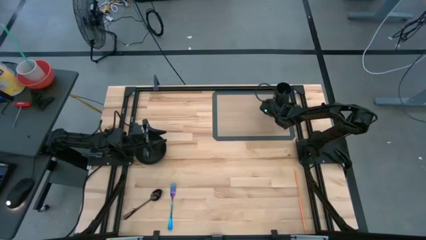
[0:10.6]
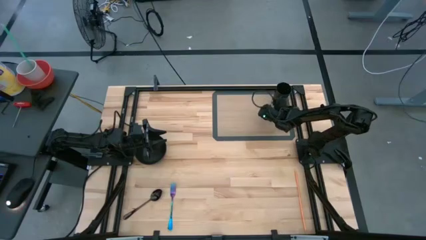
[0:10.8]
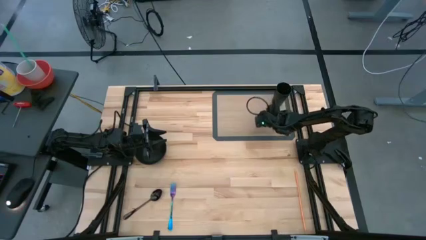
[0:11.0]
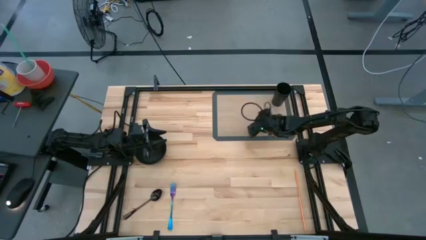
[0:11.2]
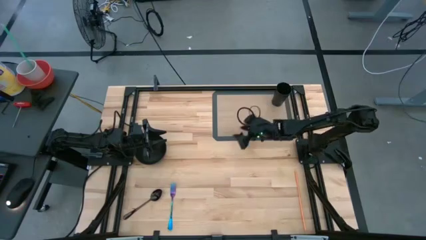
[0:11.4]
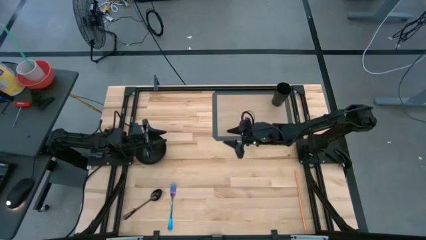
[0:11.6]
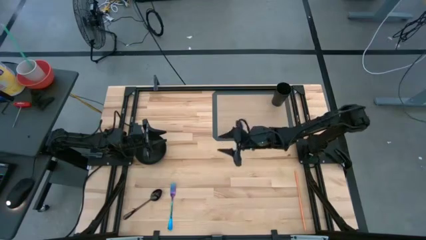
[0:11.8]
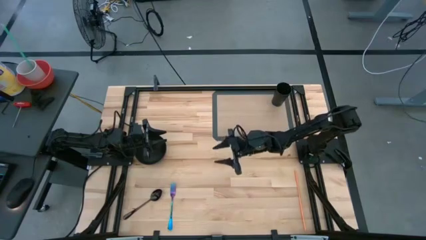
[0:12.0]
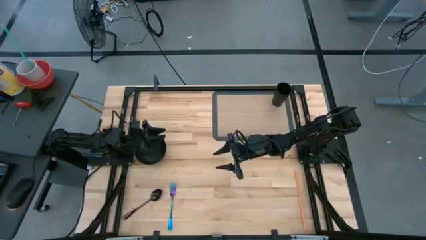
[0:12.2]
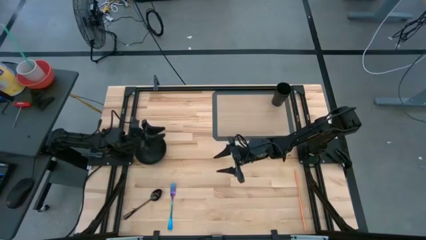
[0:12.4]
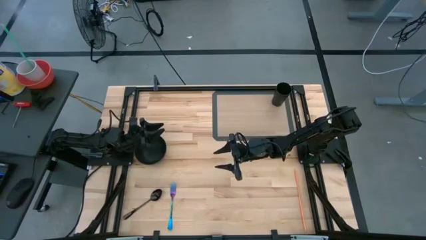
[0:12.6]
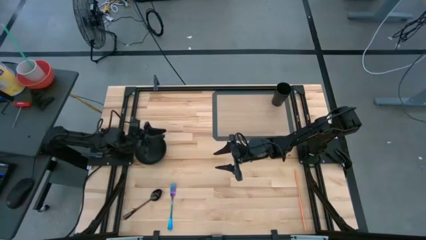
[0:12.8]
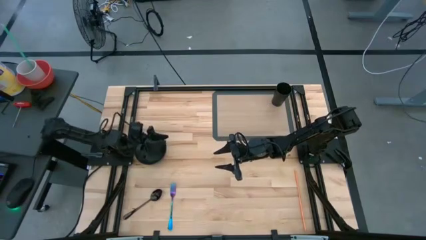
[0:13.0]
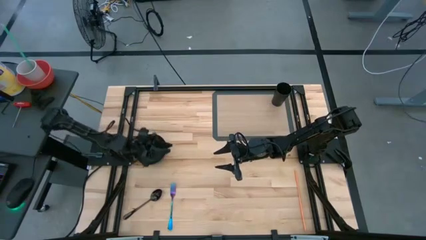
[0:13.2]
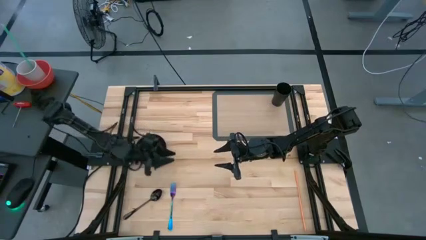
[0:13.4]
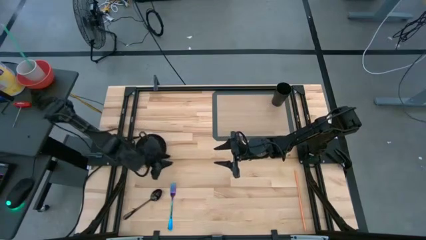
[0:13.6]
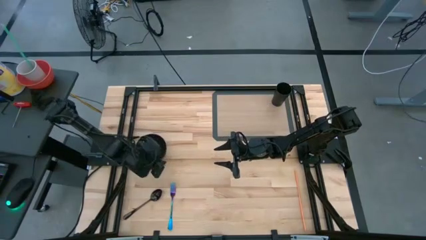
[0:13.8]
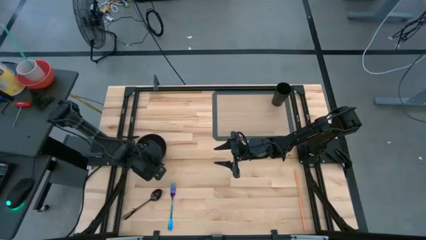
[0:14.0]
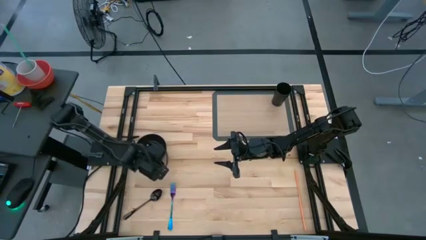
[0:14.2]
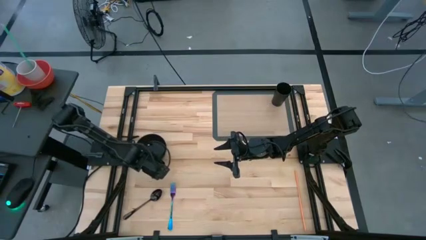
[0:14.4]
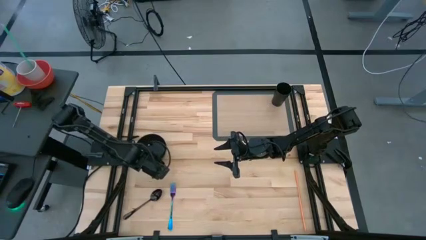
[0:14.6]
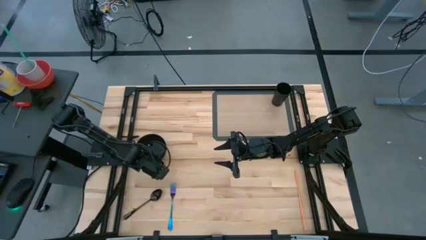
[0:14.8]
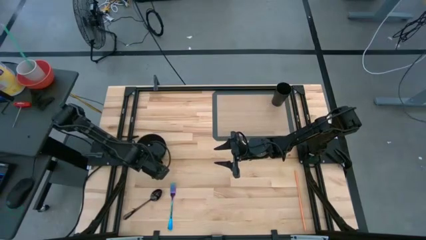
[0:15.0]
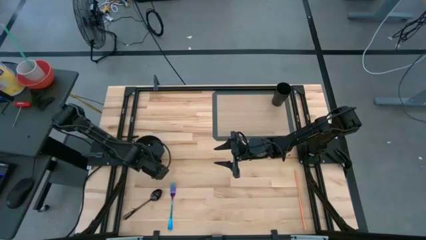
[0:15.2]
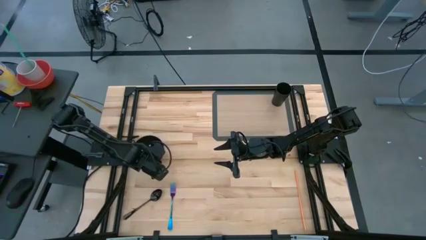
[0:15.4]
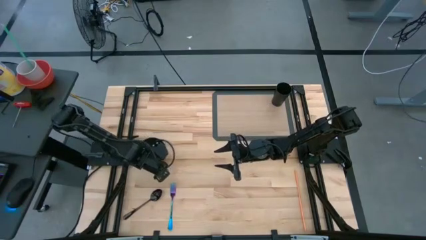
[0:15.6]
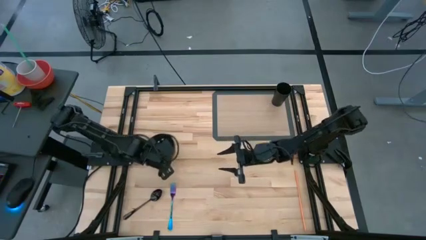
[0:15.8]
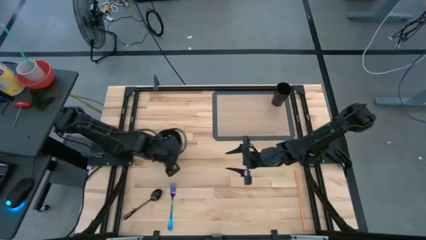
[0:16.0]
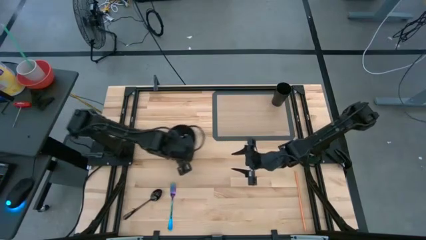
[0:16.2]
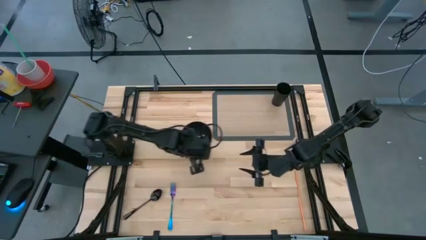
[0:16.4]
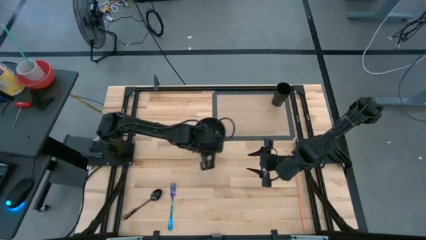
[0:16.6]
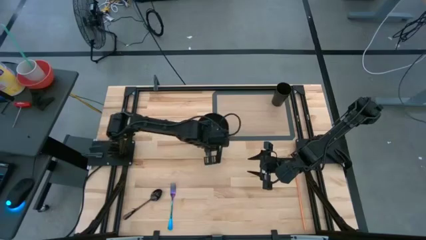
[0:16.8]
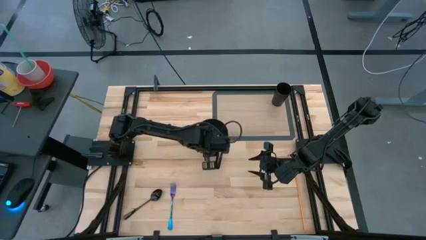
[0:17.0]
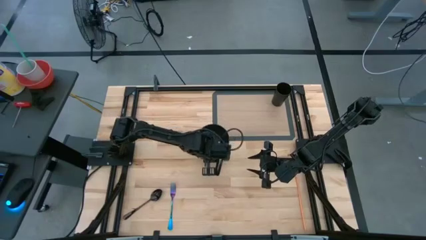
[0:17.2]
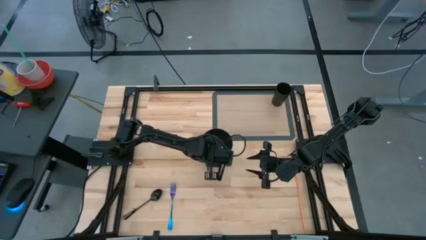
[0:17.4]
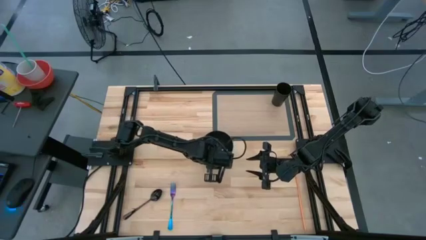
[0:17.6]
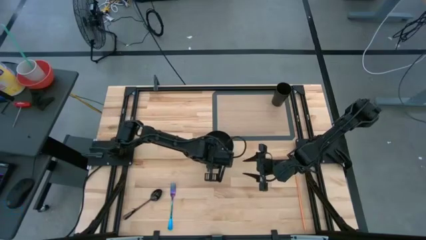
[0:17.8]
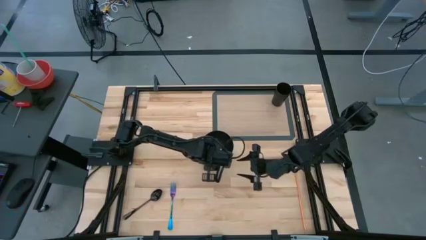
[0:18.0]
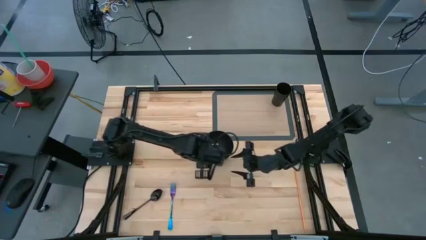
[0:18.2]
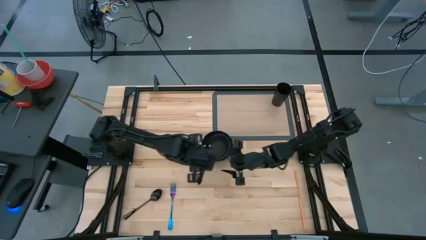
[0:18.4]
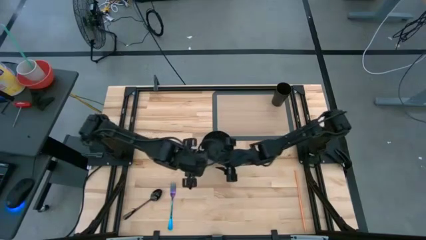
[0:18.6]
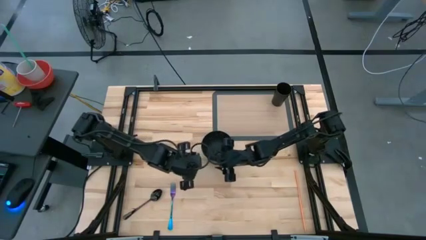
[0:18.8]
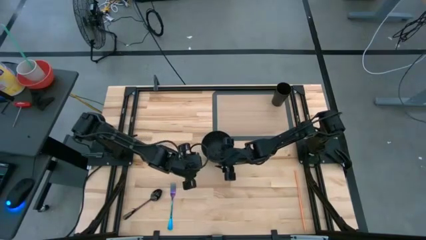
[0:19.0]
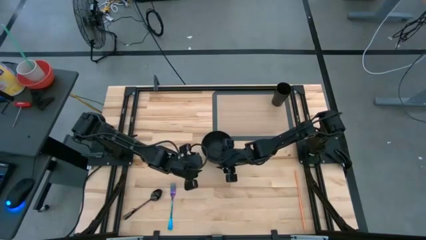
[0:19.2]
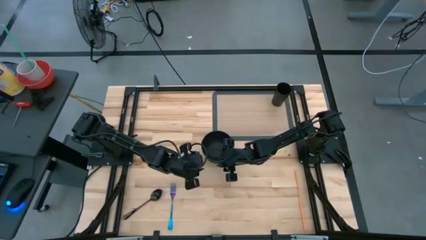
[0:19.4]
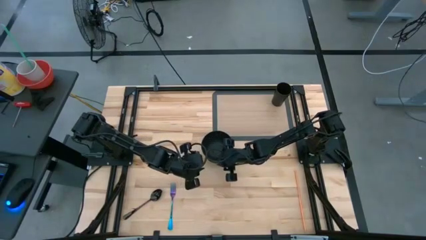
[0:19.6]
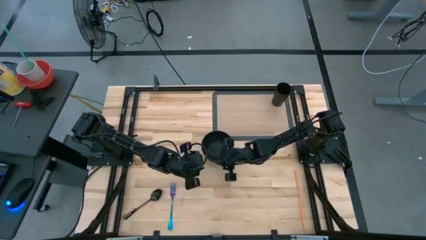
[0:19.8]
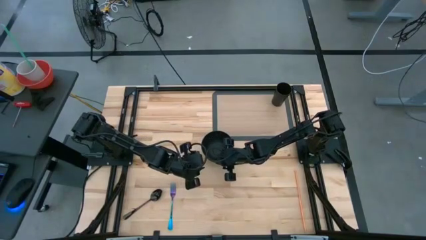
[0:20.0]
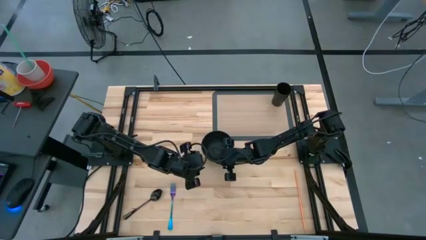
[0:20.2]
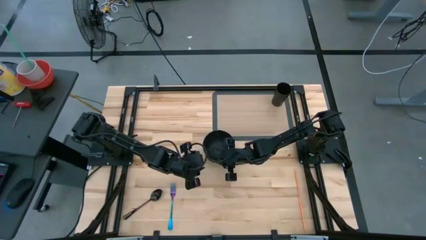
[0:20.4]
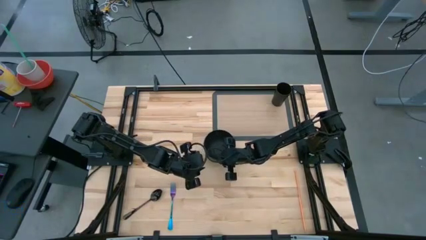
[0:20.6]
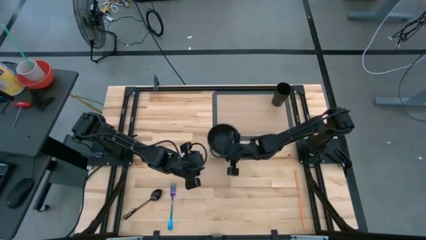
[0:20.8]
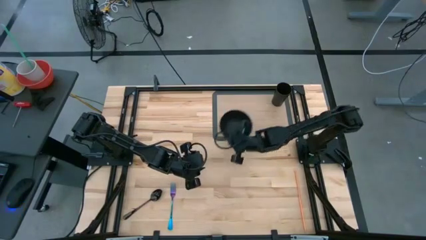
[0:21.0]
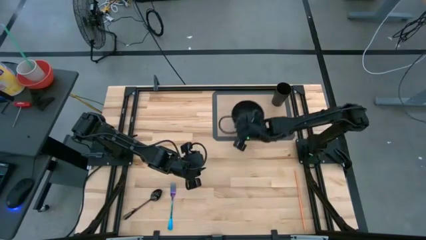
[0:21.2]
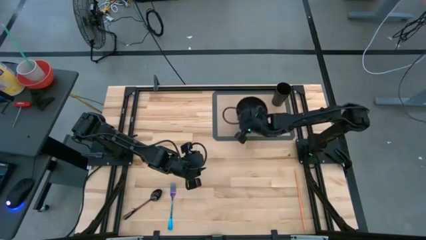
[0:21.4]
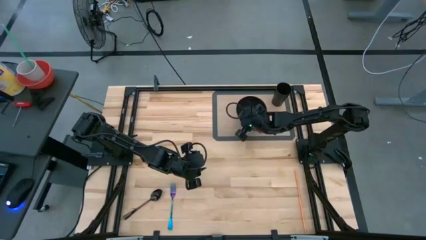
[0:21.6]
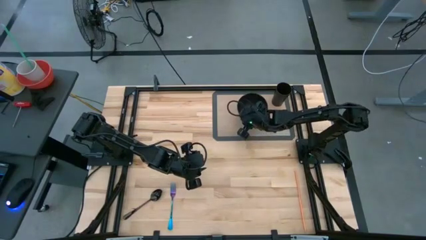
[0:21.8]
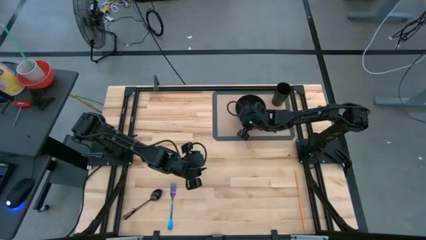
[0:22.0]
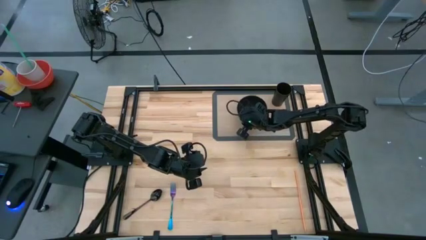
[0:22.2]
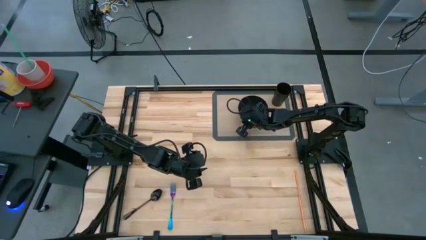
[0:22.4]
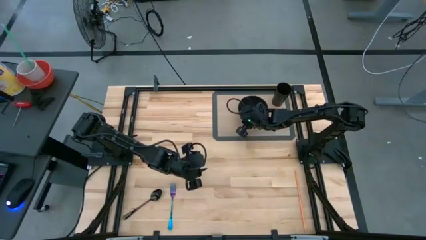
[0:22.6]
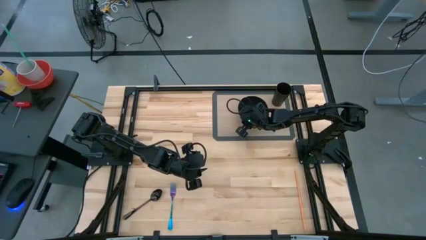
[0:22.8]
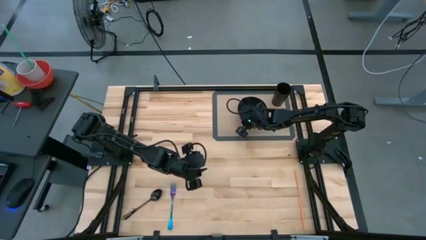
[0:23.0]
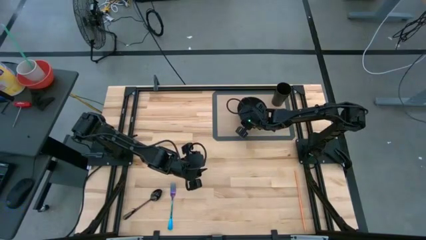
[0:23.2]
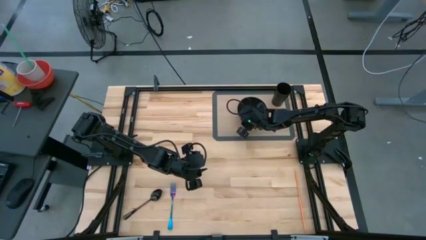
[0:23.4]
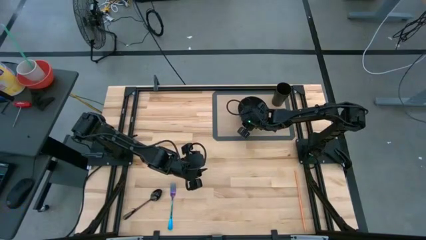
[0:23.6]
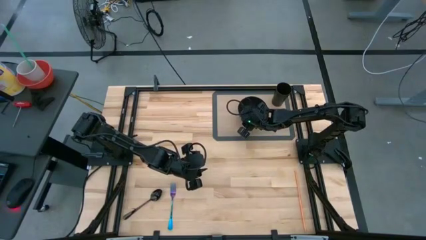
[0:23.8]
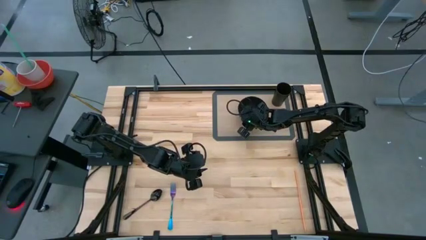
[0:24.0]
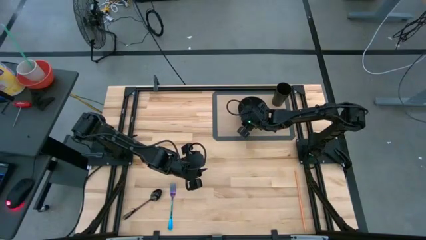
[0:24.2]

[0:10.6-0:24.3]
Task: Pick & Place Utensil
Put the black bowl on the transparent mat to the bottom left of the black cup

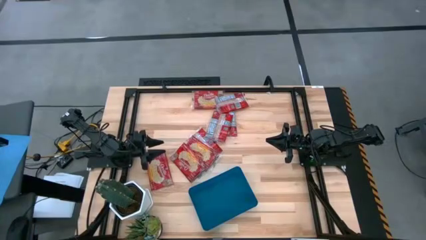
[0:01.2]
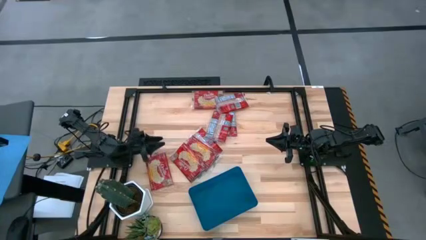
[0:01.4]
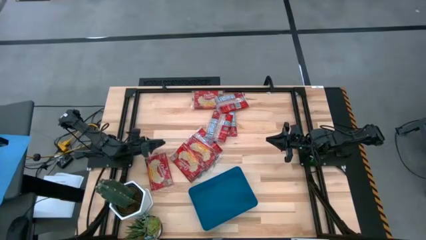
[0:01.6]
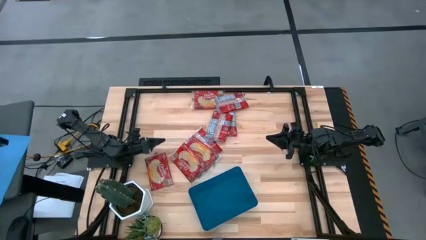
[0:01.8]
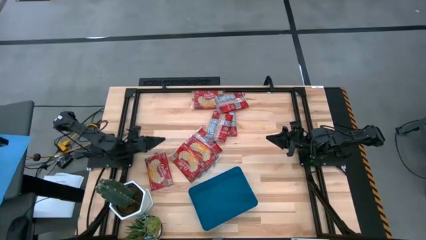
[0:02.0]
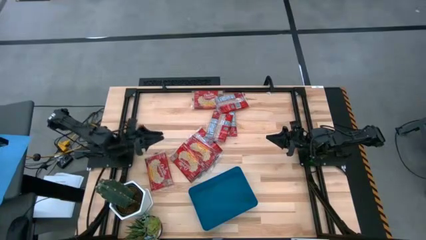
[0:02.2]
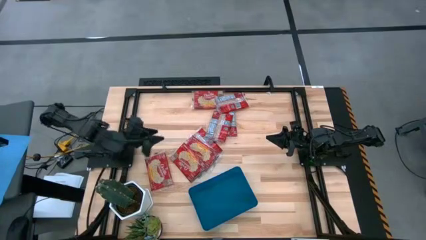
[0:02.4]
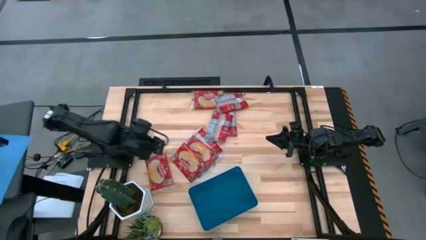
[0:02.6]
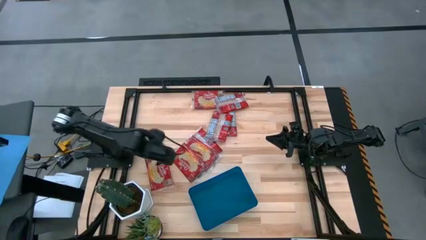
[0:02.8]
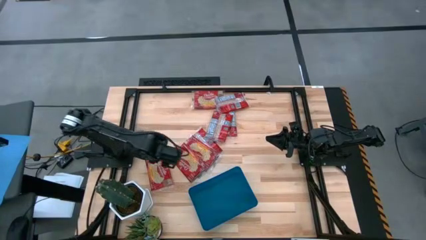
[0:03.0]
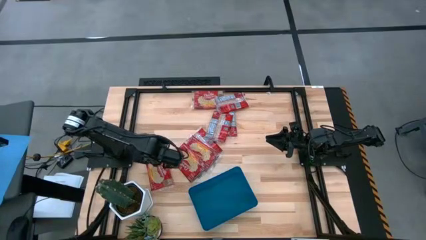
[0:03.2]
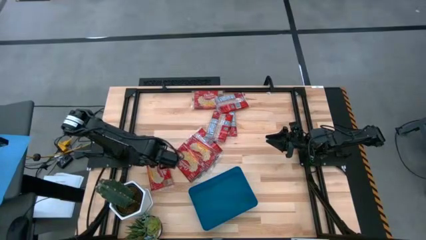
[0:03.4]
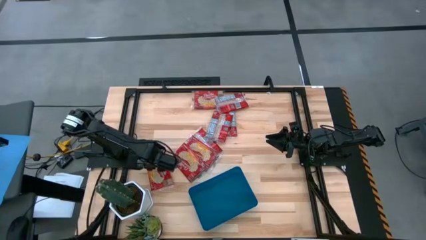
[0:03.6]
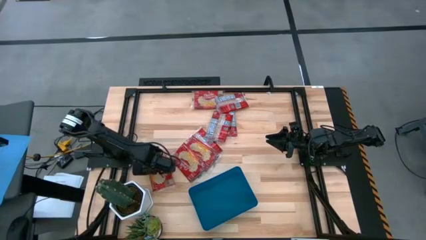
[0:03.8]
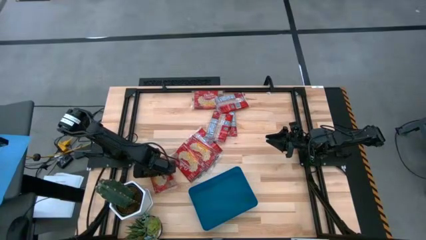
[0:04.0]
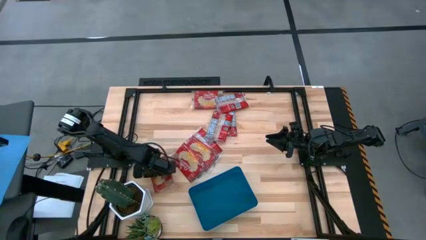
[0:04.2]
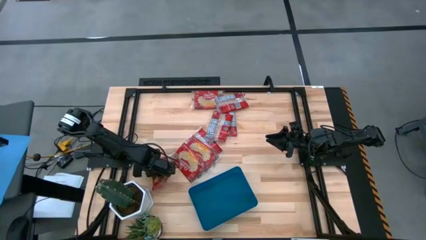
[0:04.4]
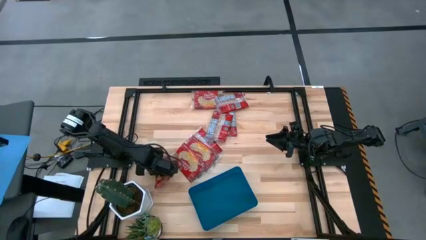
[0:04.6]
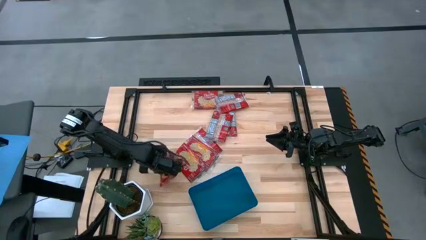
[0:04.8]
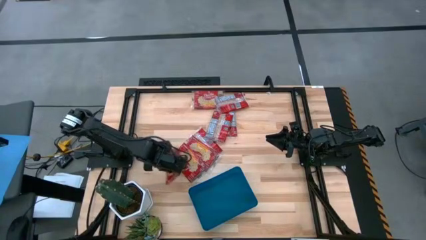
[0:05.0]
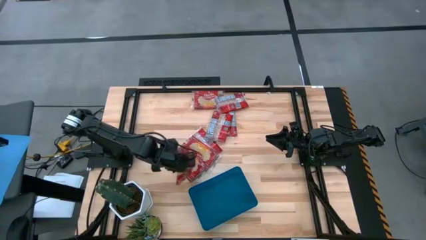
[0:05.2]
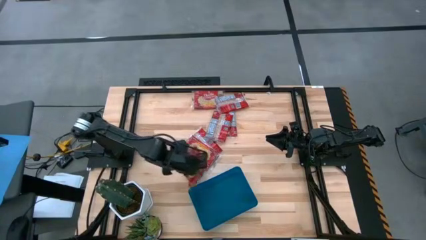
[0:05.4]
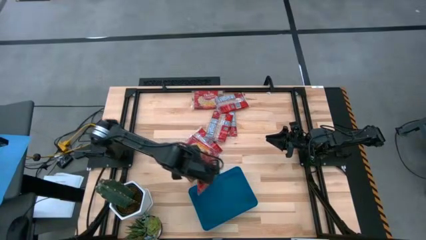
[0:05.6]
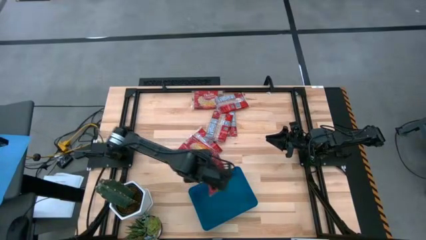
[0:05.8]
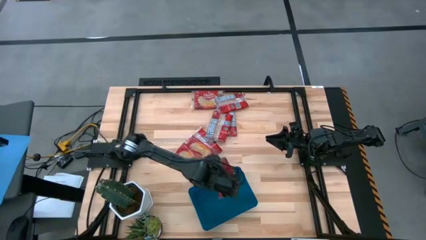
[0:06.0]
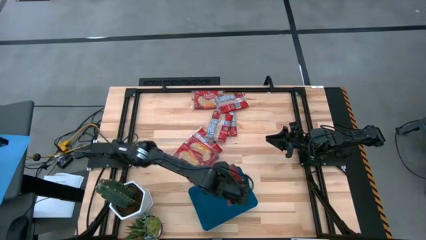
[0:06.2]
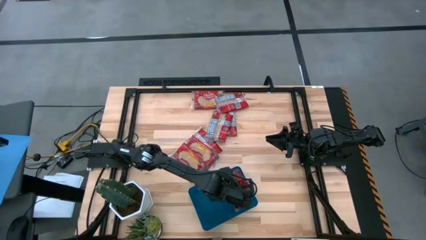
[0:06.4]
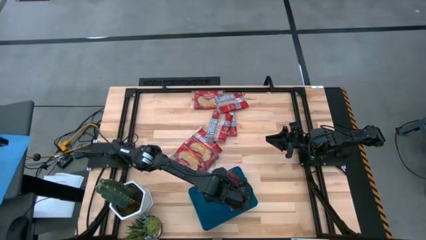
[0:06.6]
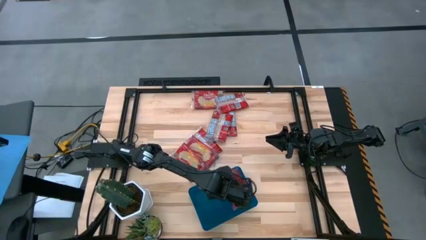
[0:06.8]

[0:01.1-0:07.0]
Task: Sort popcorn bags into baskets
Put the popcorn bag into the blue bin
